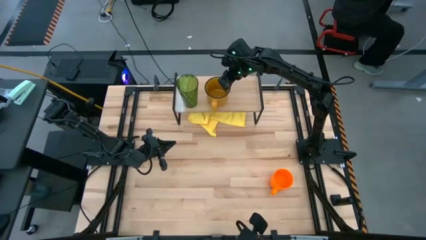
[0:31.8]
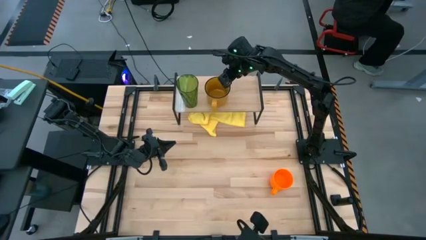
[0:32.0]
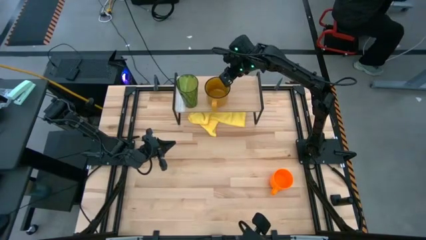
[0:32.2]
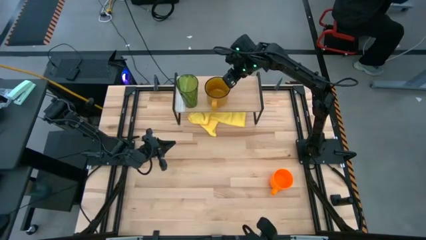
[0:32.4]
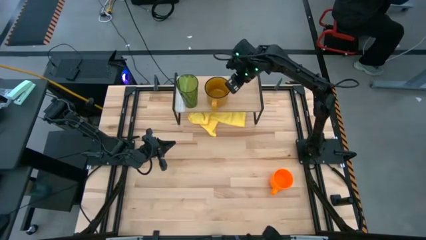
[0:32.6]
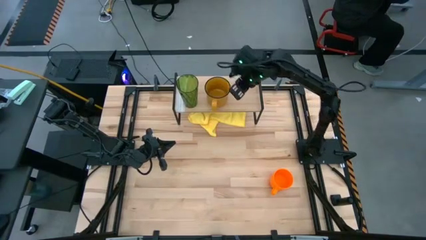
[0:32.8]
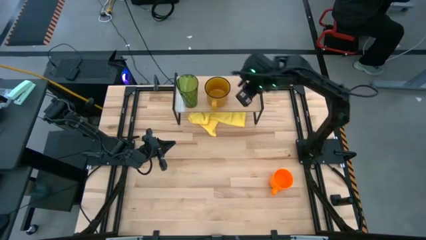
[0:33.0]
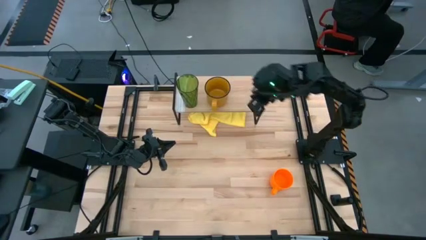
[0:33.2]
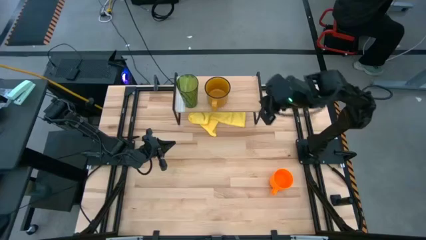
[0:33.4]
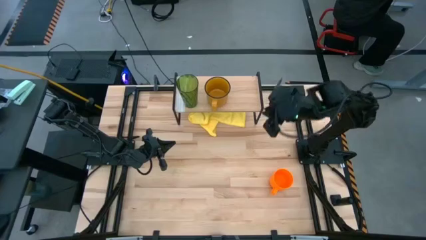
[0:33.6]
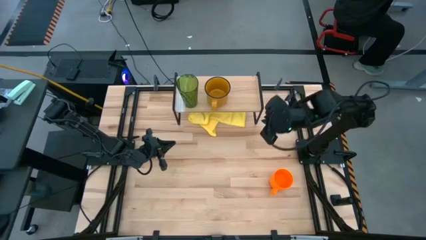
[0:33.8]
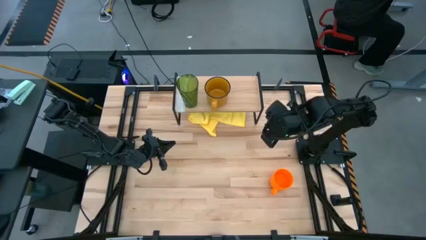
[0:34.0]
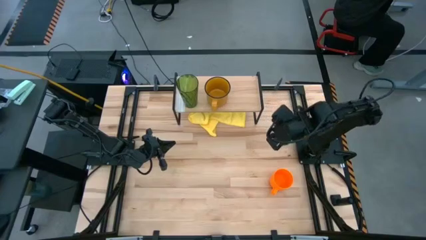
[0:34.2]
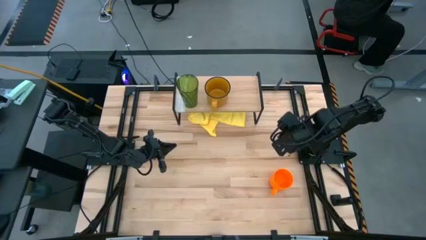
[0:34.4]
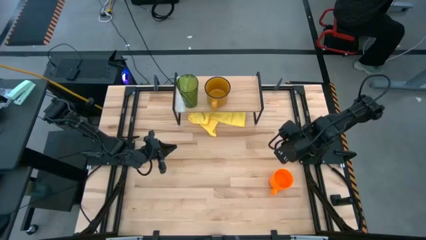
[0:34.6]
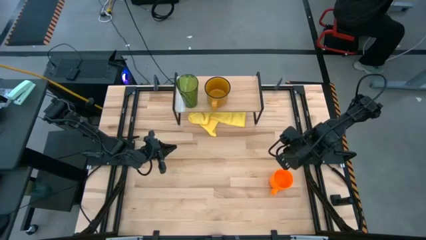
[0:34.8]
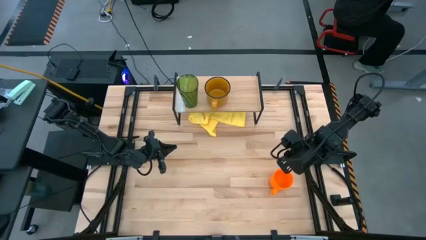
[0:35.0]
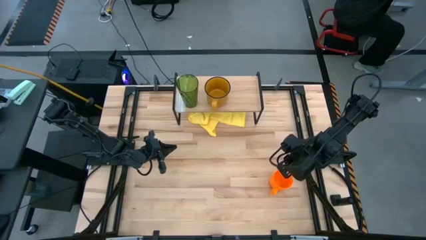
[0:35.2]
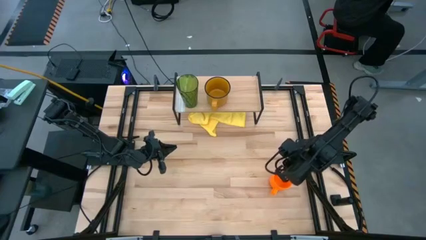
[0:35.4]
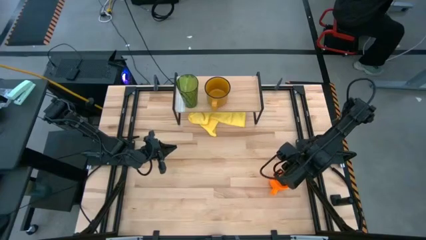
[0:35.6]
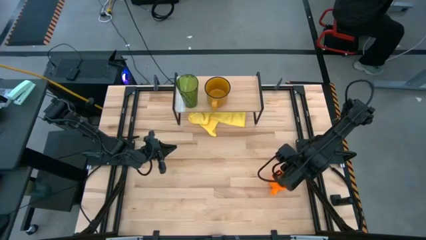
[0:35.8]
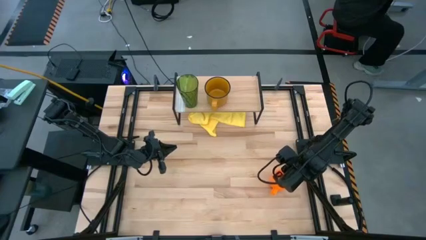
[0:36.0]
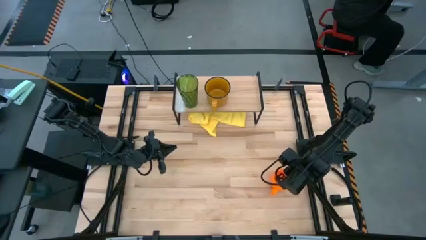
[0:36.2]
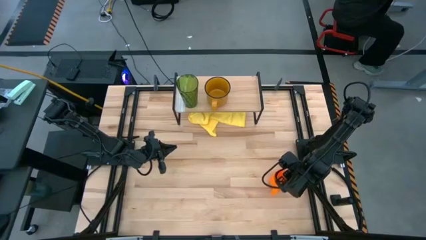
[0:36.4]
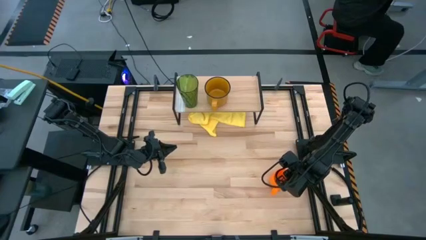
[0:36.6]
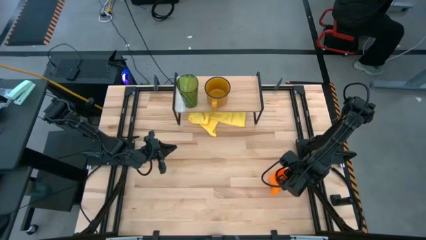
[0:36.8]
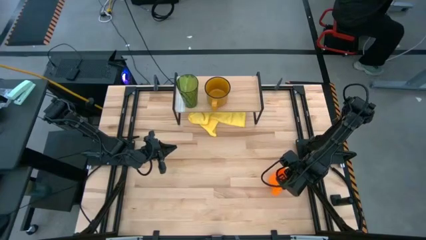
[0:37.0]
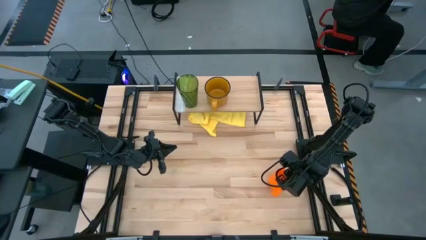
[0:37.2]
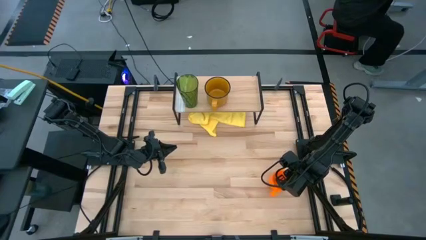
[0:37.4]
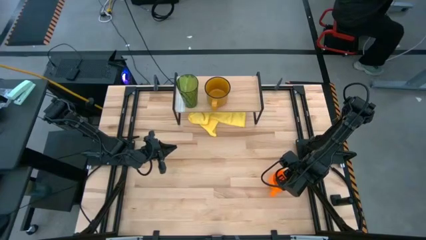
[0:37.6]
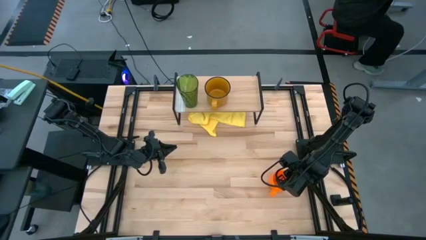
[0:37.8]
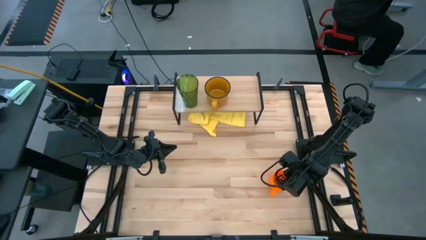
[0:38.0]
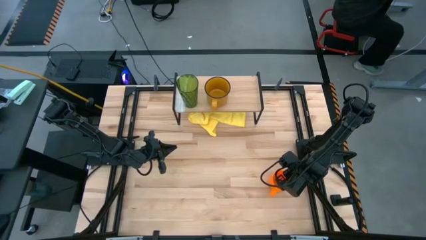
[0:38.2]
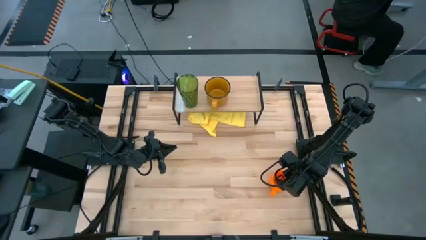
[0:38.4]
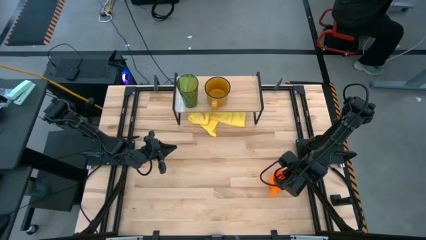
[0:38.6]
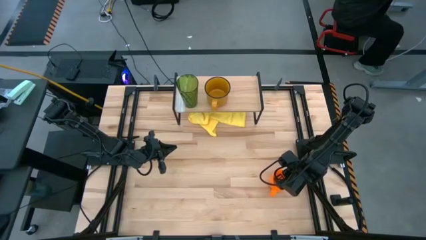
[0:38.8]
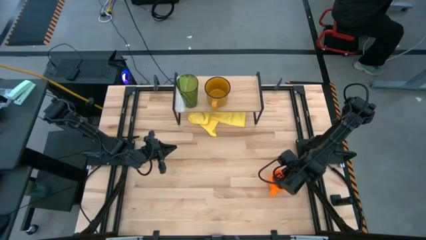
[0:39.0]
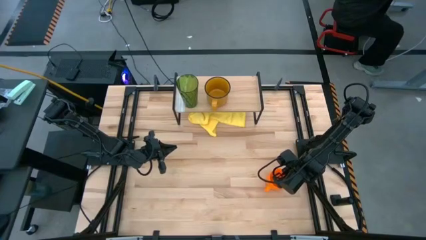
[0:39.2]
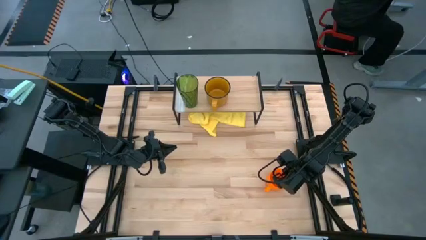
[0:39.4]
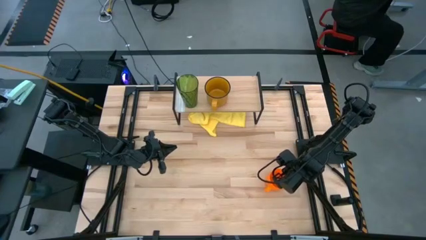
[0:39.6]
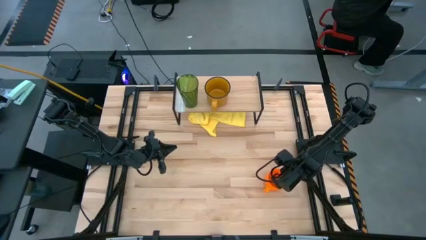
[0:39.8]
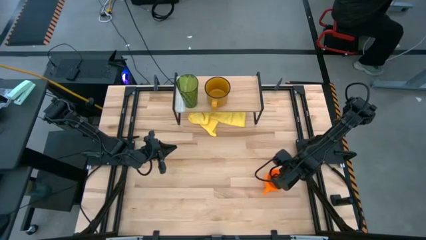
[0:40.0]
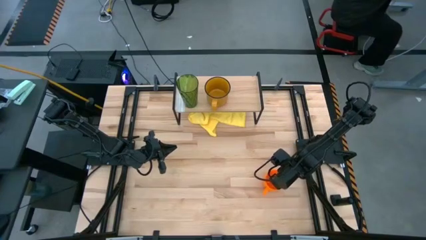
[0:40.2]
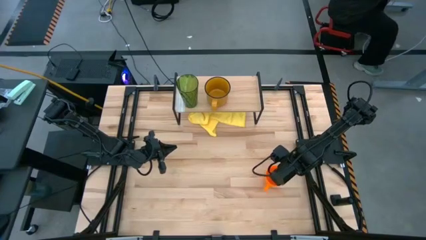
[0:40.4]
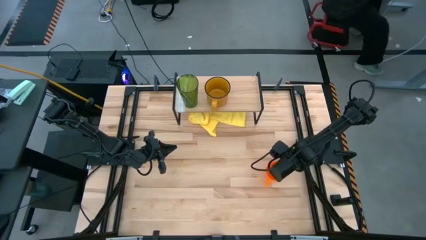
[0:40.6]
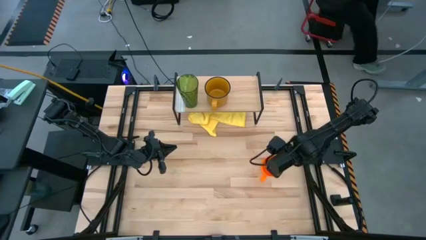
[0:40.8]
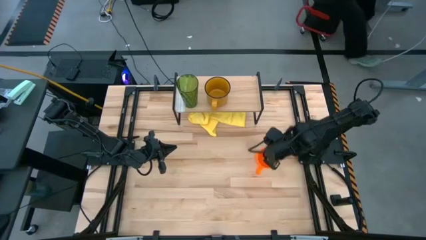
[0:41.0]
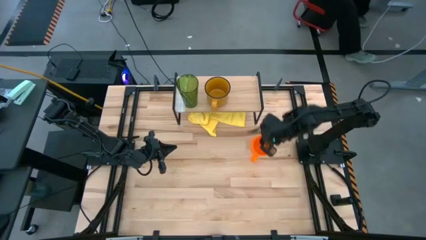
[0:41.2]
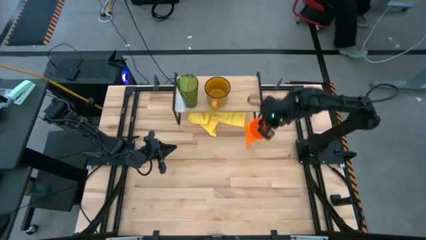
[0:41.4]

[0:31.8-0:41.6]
Task: Stack small to large cups/mugs on shelf
Put the orange mug on the shelf

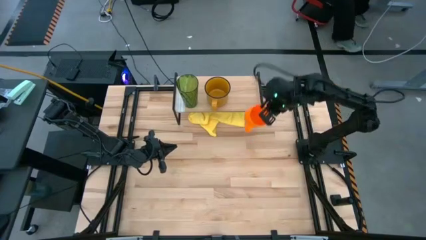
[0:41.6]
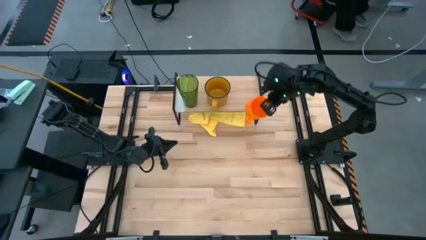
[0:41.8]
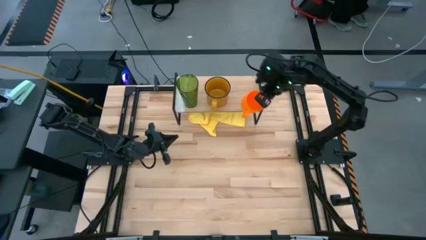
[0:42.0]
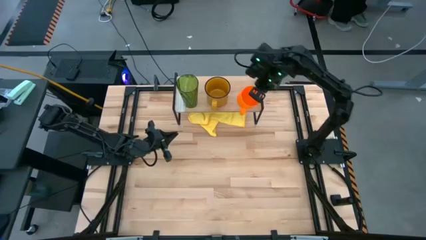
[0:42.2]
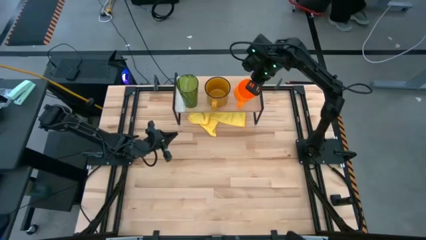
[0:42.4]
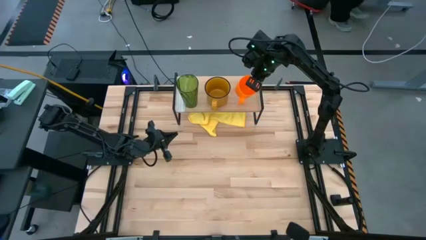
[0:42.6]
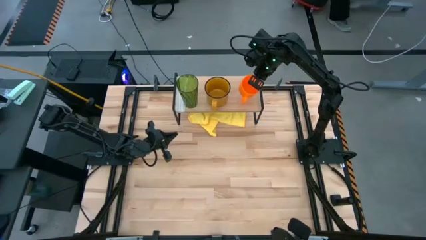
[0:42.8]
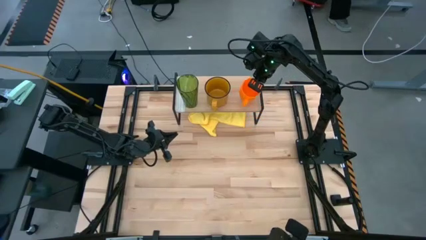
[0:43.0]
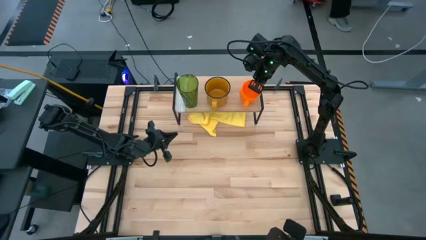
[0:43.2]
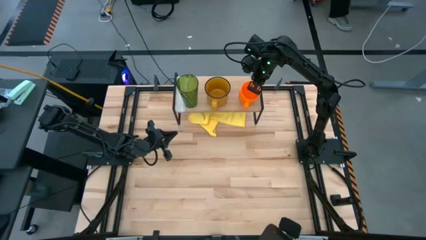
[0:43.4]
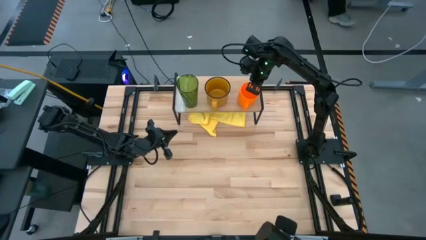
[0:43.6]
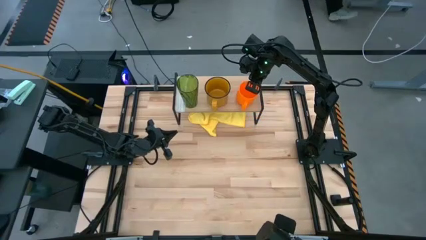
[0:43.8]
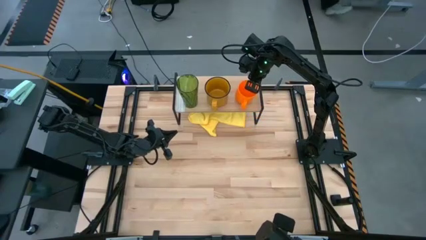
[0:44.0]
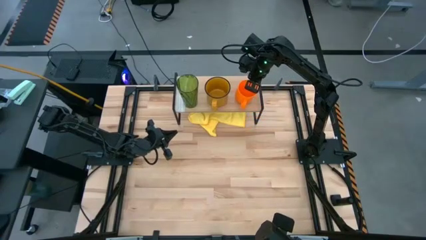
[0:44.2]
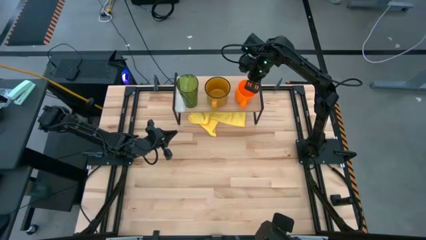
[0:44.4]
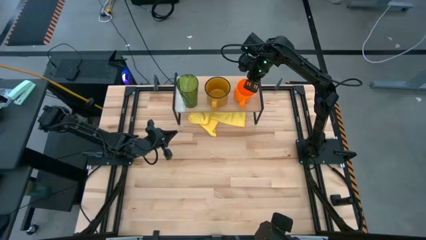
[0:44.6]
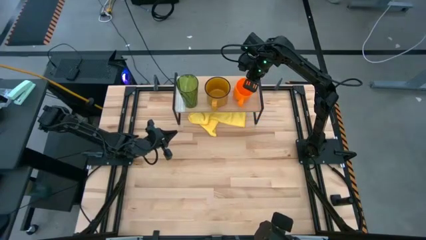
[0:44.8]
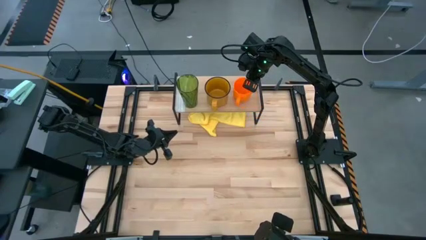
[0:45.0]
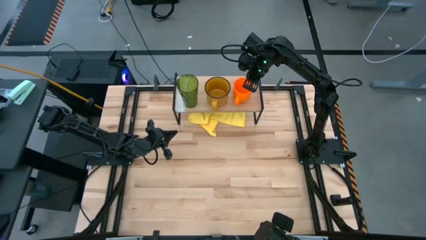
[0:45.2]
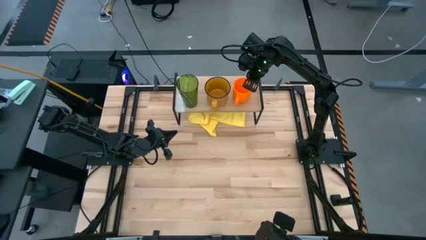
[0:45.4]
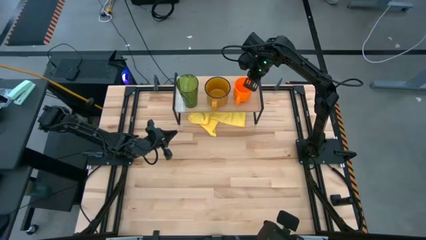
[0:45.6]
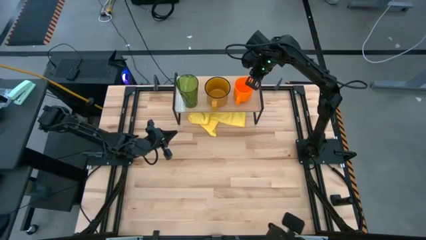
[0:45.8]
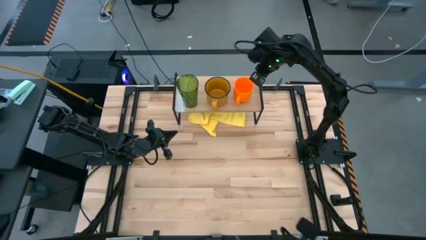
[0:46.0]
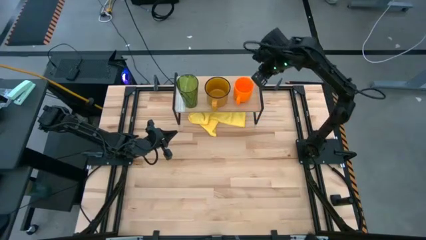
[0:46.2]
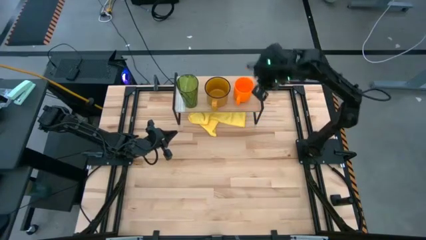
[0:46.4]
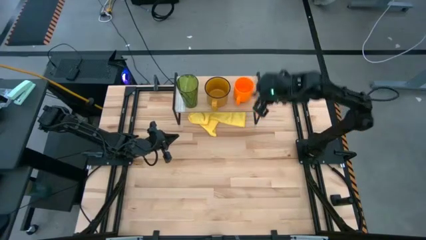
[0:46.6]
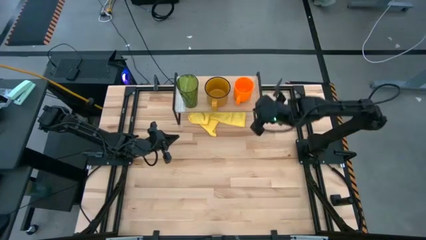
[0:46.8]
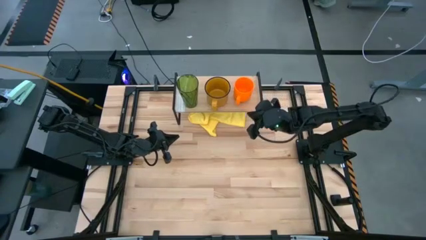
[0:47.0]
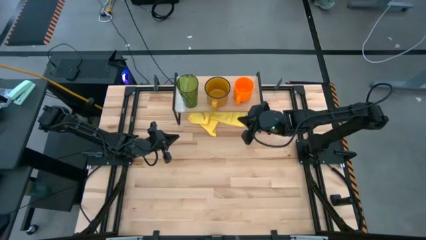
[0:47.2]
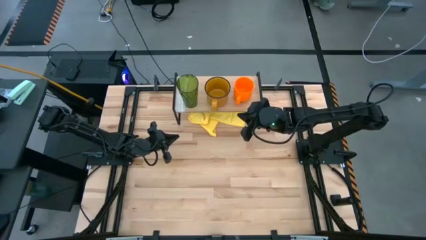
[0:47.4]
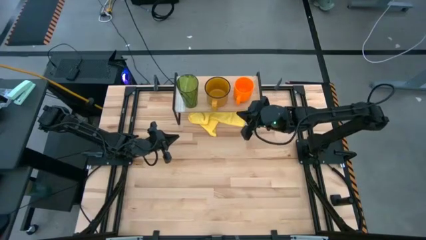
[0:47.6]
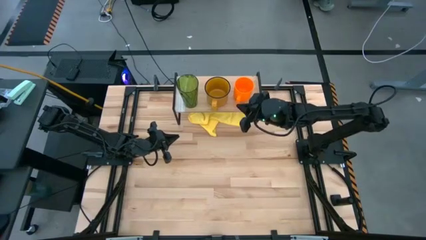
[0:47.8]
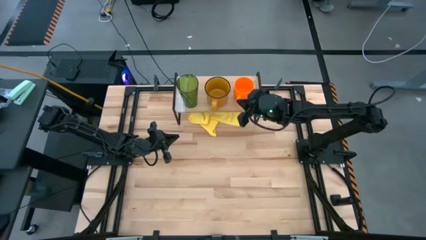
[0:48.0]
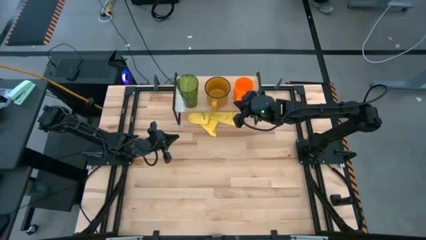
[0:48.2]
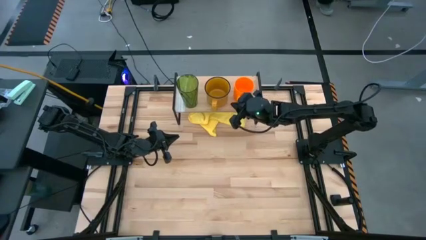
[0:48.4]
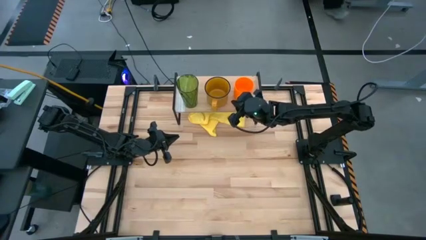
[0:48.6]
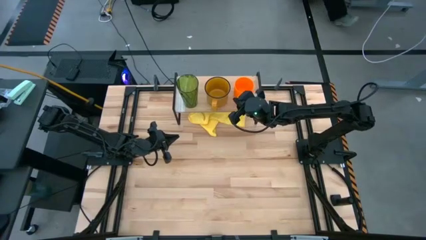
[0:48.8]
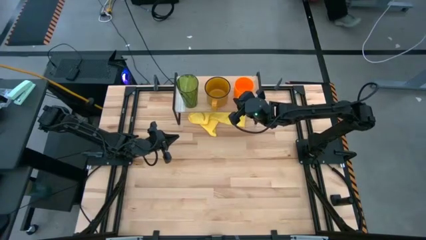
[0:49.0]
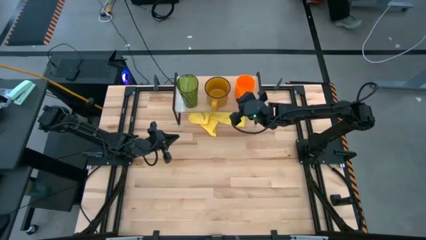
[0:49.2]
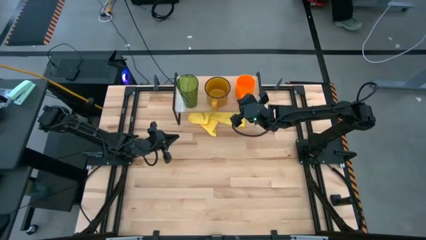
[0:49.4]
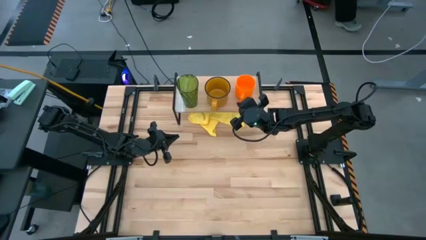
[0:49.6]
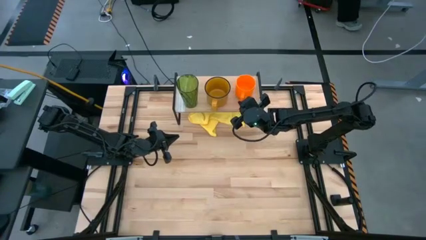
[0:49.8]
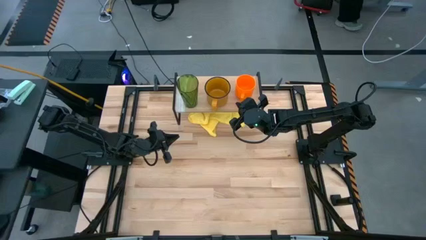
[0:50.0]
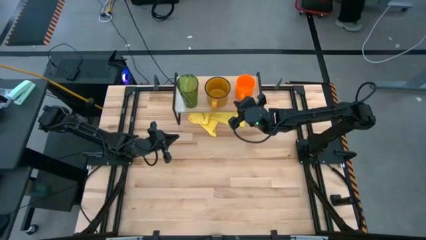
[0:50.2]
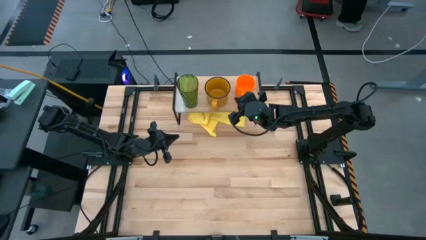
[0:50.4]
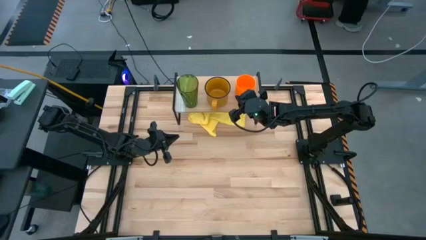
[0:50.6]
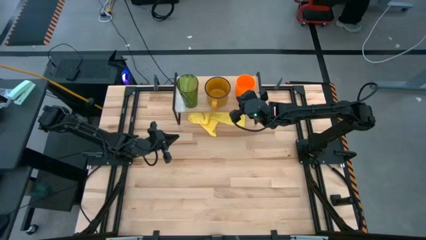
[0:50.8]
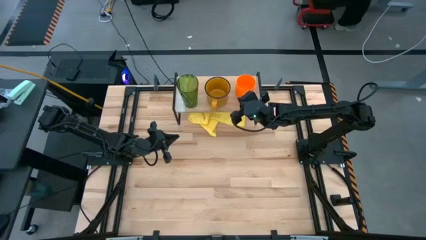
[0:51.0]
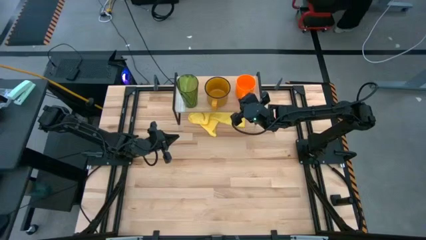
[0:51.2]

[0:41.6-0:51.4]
Put the orange mug on the shelf
